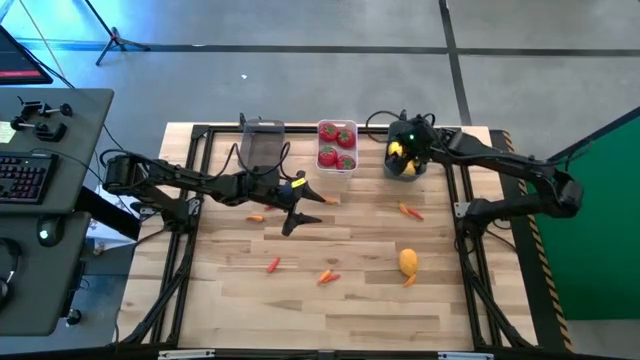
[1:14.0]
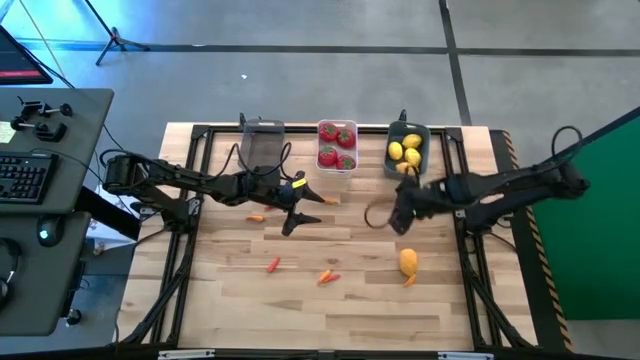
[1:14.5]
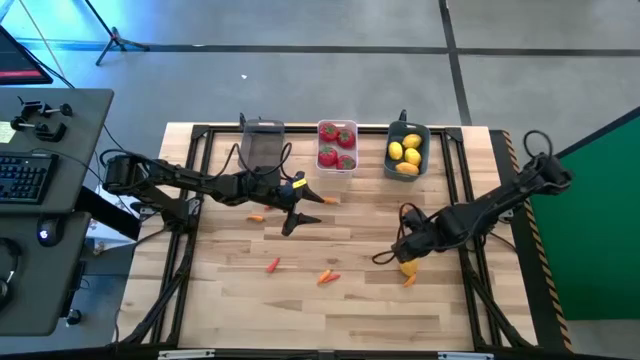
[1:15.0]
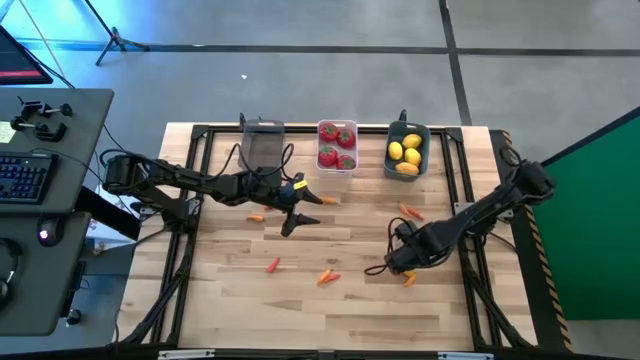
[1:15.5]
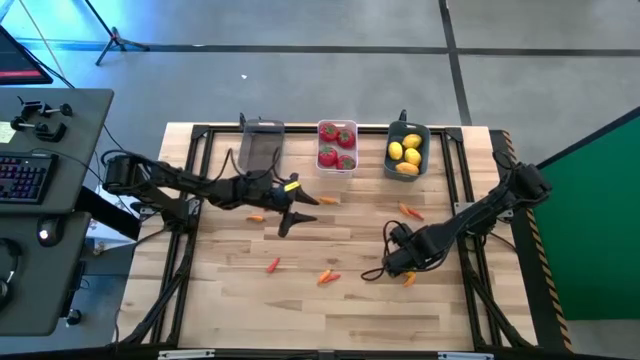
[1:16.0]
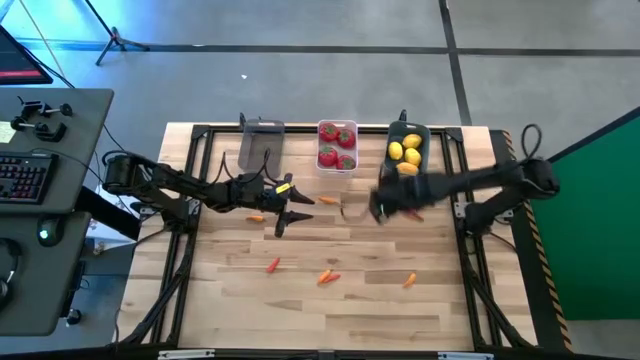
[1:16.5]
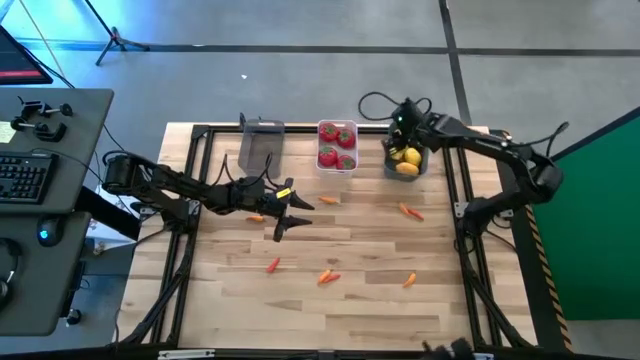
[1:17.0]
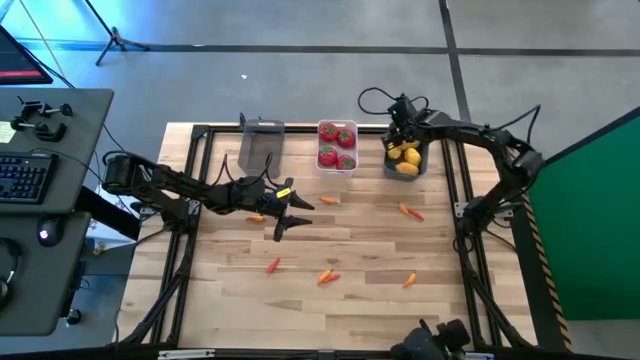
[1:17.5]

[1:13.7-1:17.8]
Task: Sort produce into baskets
Put the yellow lemon into the blue bin

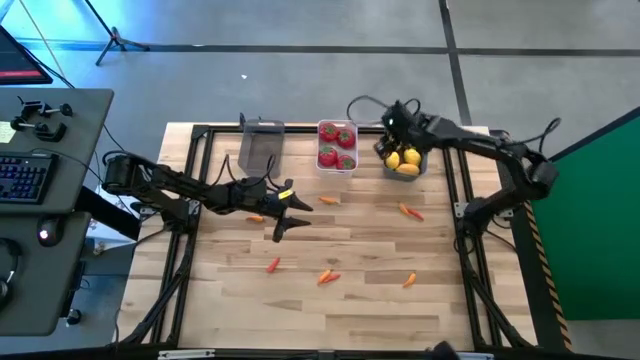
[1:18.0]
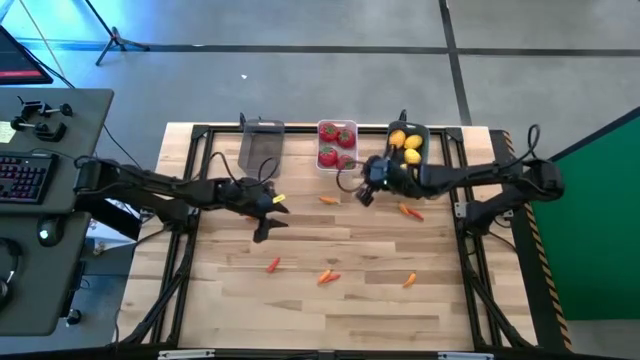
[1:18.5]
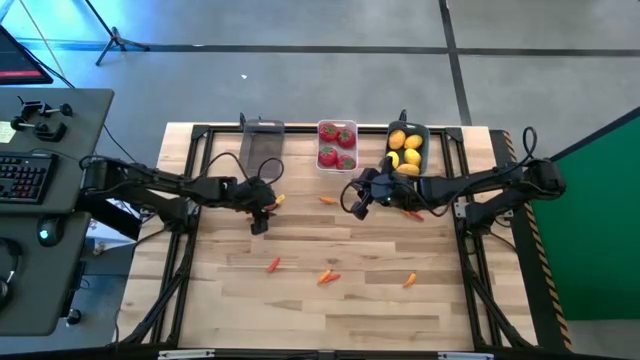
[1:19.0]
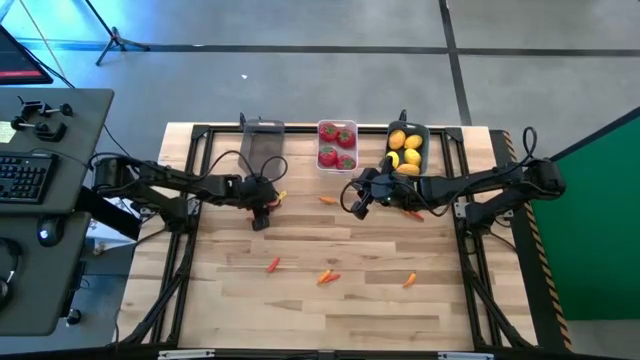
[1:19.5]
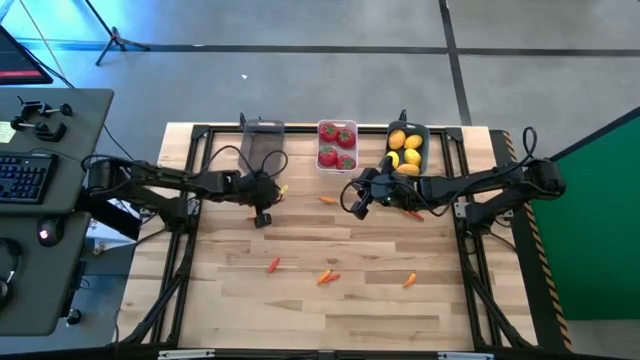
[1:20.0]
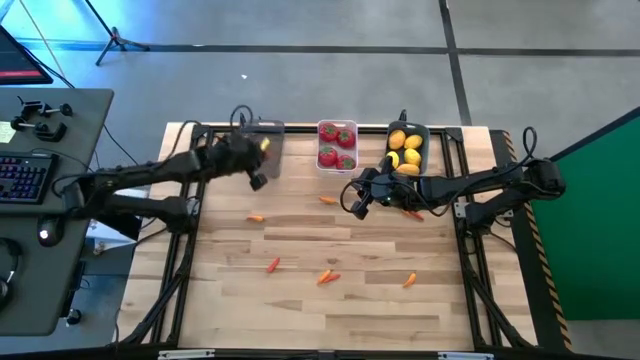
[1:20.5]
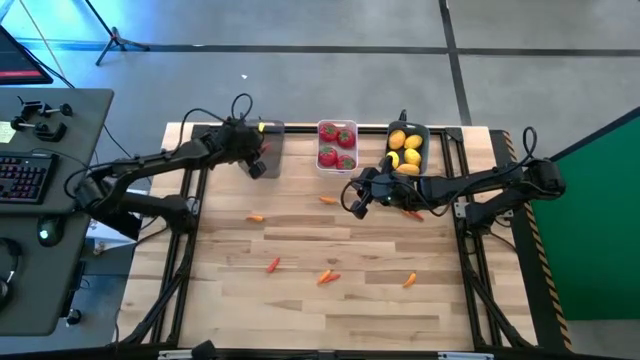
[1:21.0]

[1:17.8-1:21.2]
Put the red chili pepper into the black bin

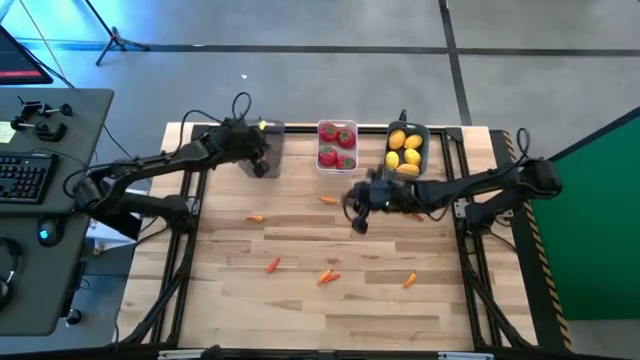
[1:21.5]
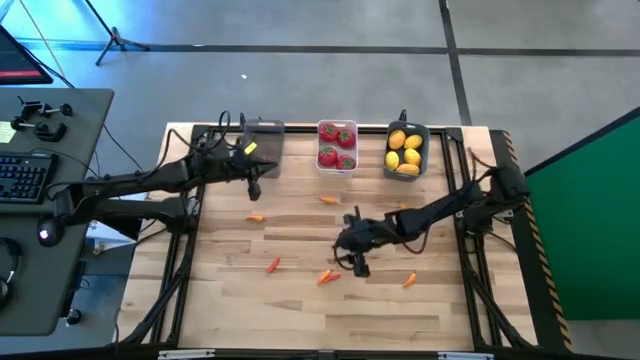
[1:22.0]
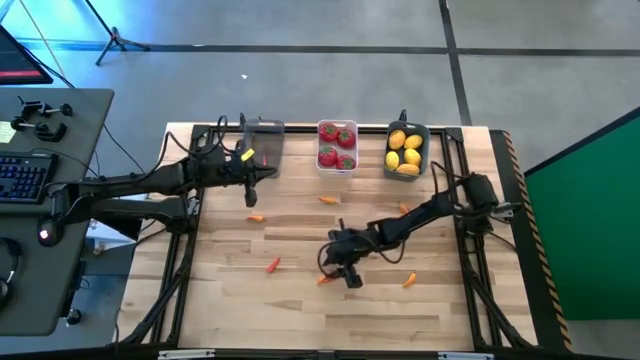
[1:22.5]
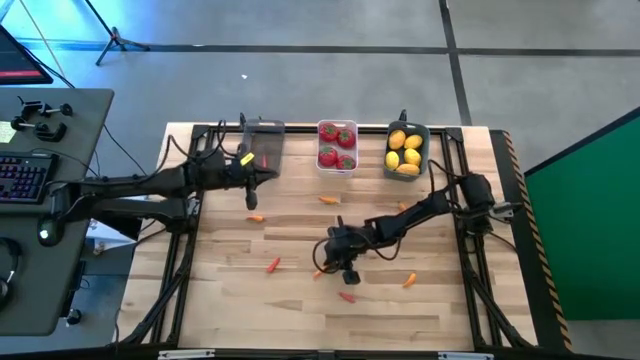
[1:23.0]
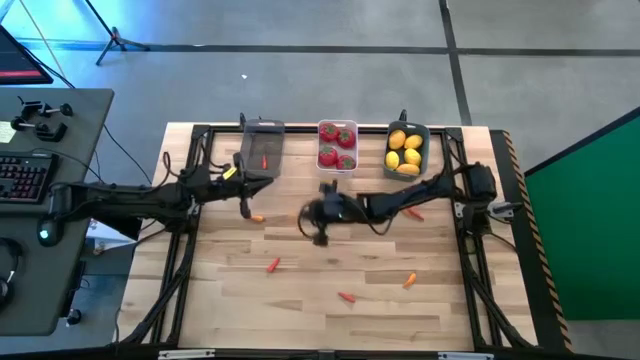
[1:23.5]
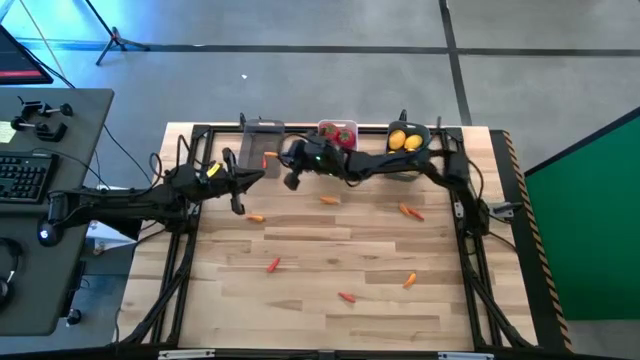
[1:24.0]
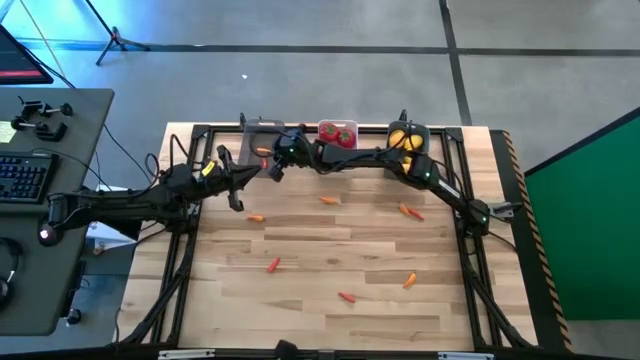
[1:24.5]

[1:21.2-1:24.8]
Put the orange chili pepper into the black bin

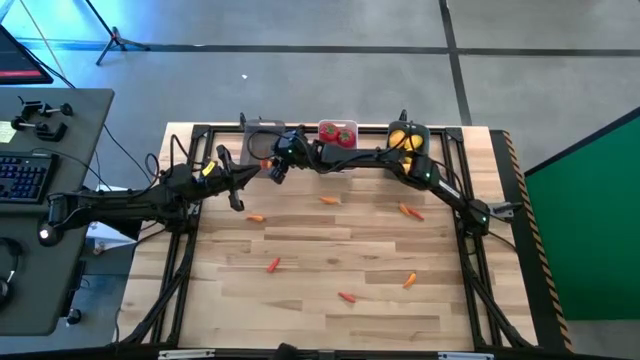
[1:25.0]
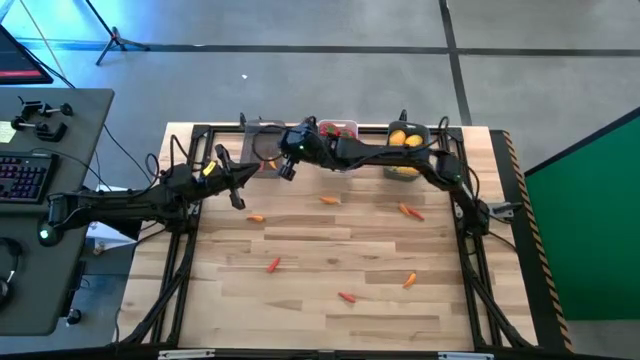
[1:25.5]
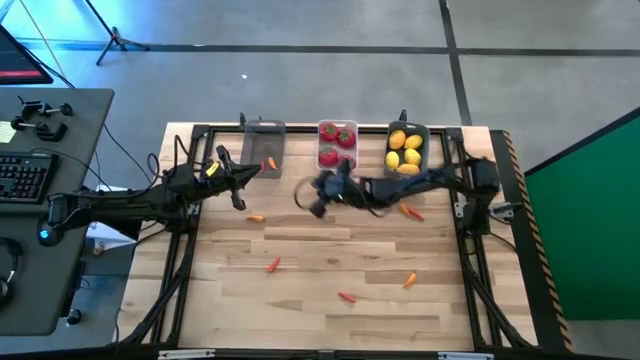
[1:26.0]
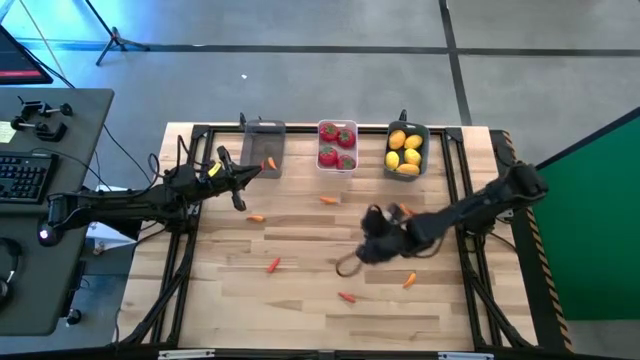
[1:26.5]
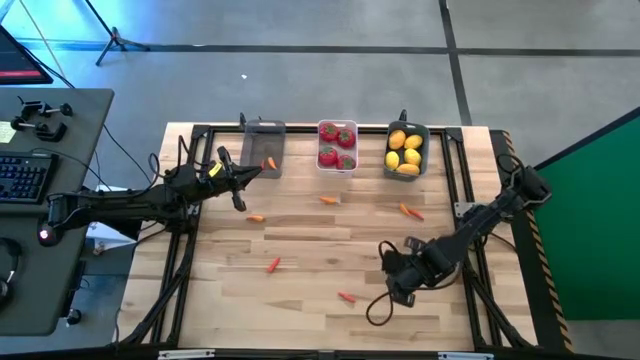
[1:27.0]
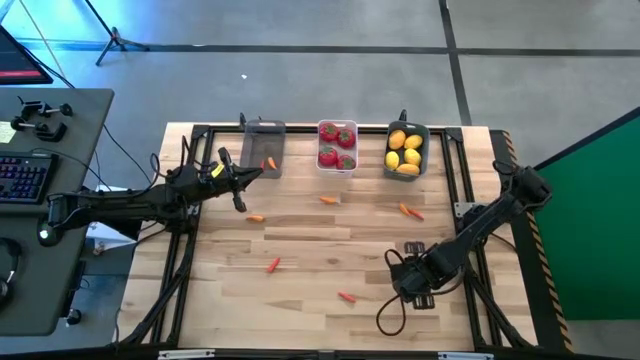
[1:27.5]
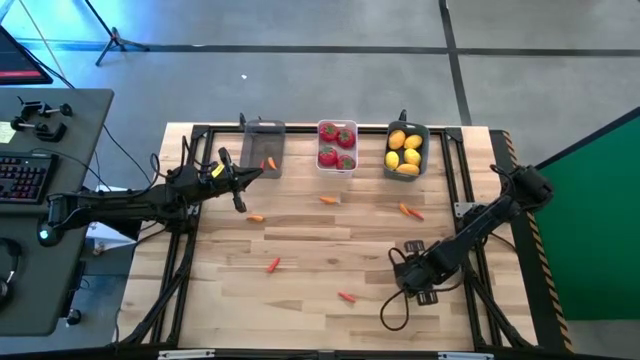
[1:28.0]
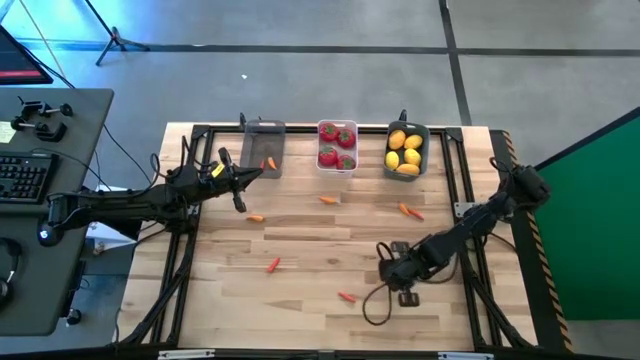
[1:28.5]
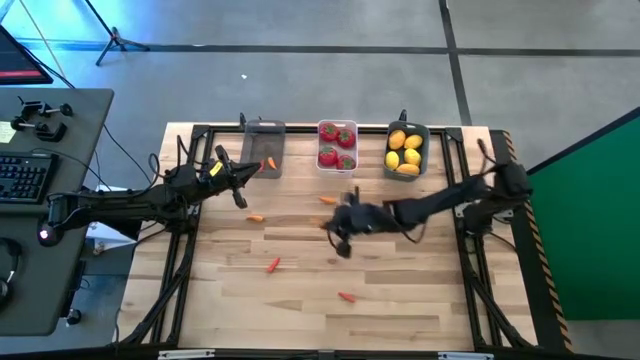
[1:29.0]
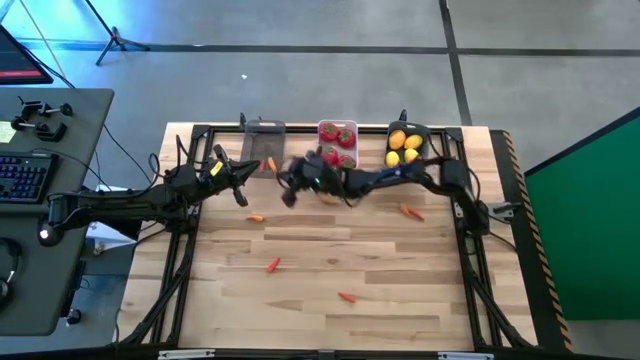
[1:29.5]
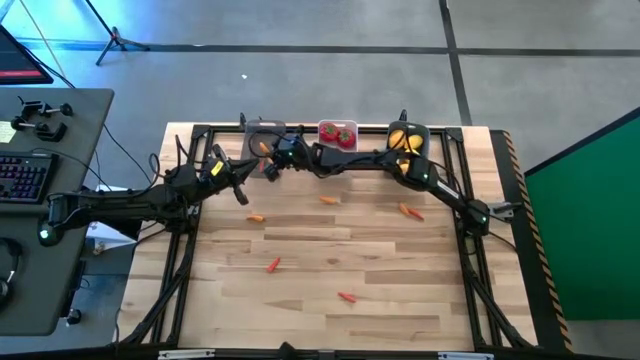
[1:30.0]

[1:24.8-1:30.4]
Put the orange chili pepper into the black bin

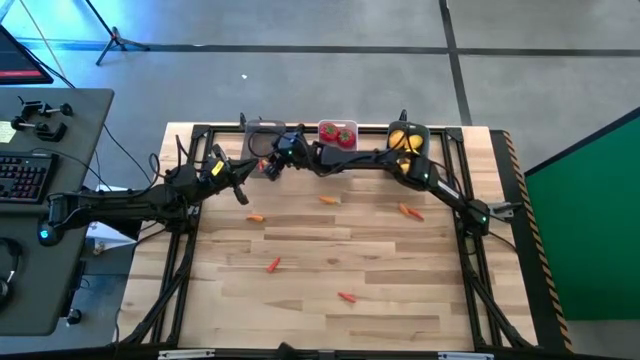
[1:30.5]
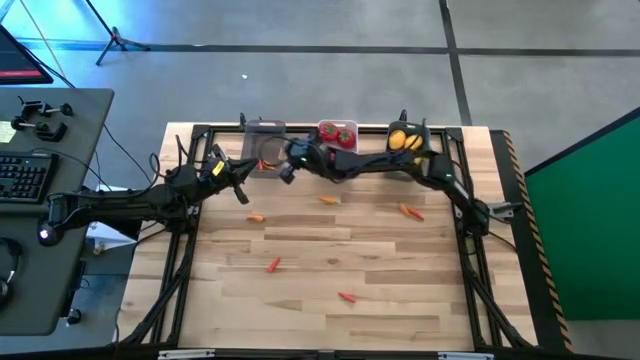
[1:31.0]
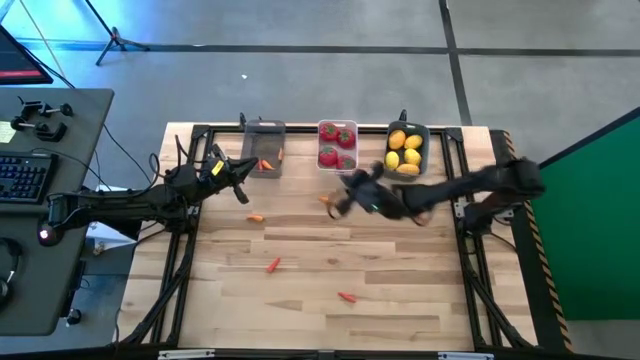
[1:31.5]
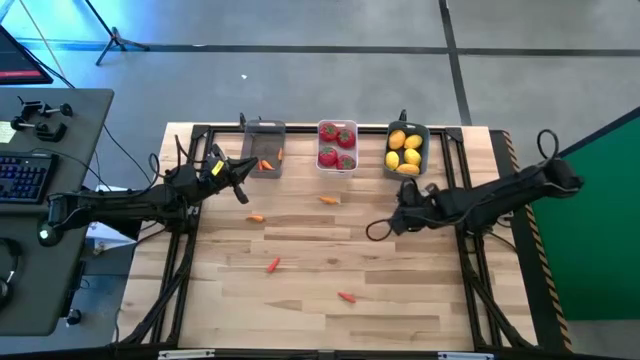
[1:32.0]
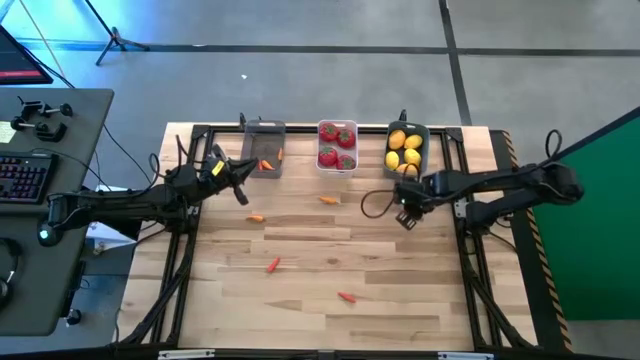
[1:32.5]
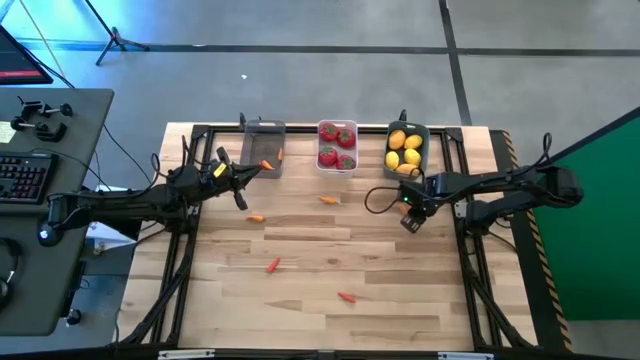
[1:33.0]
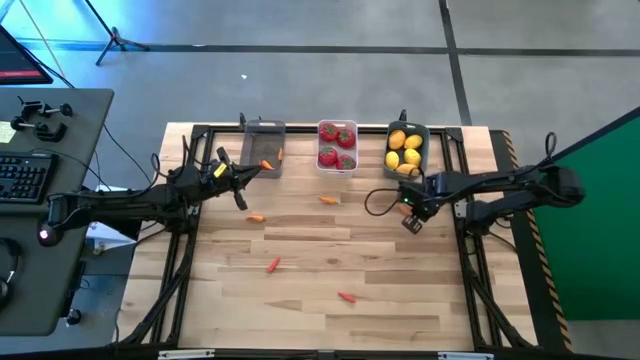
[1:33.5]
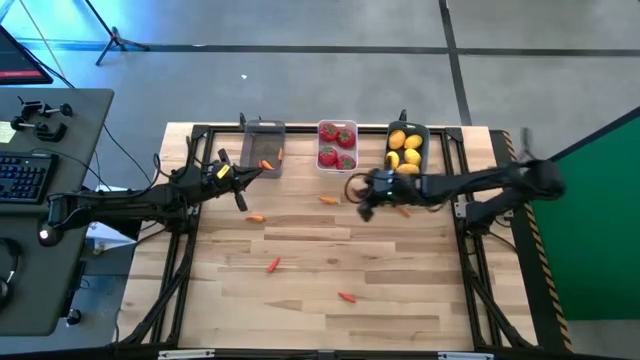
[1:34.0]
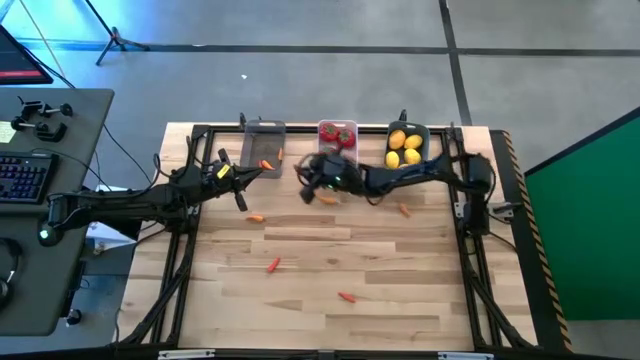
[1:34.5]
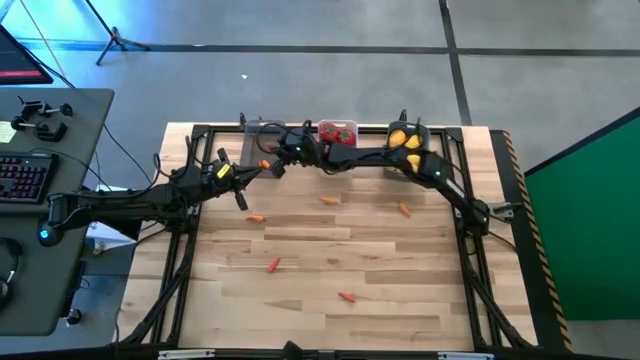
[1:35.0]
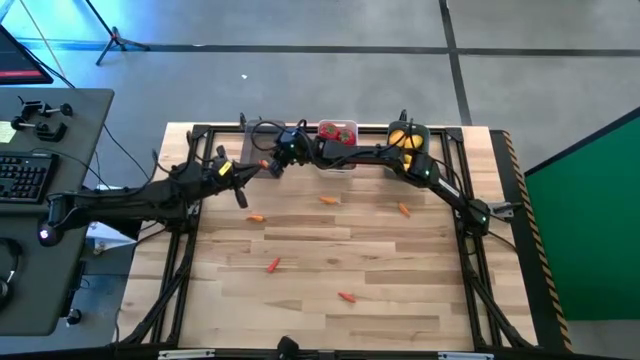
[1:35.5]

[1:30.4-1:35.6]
Put the red chili pepper into the black bin
